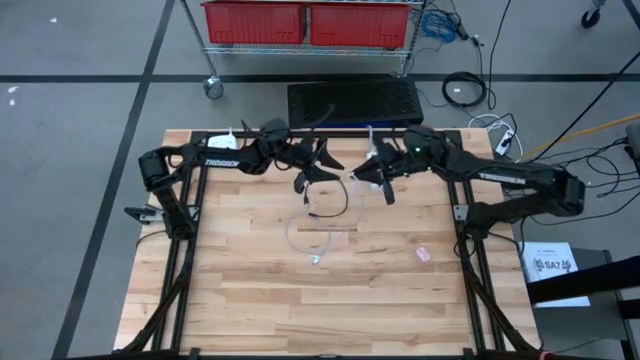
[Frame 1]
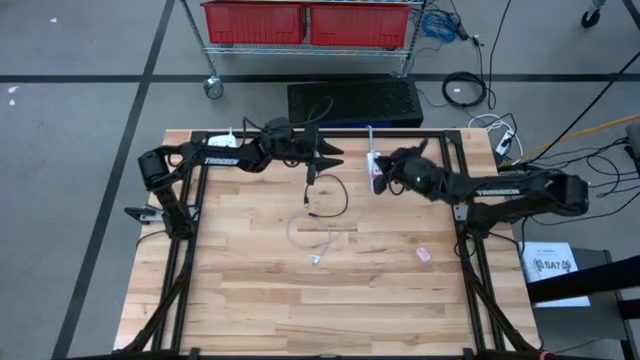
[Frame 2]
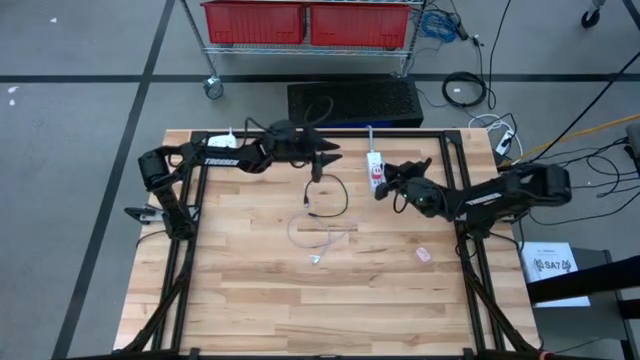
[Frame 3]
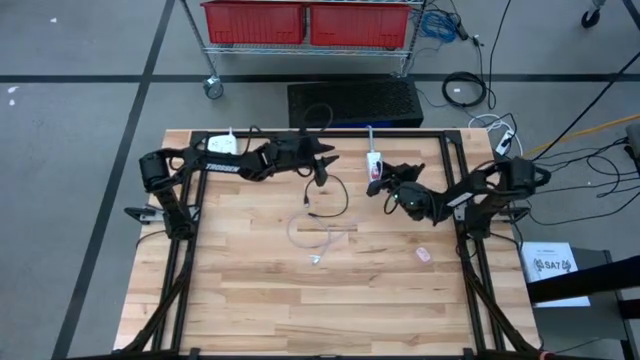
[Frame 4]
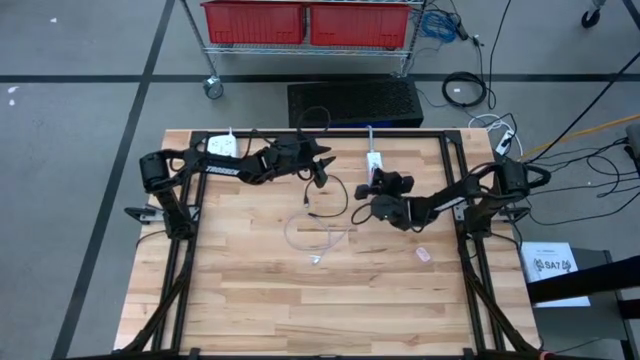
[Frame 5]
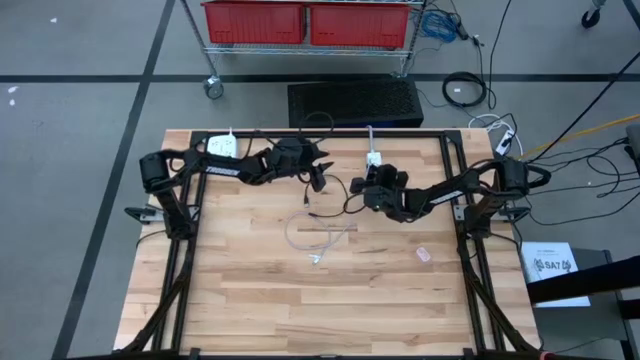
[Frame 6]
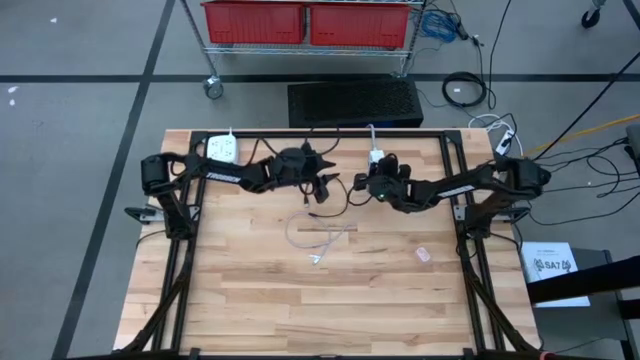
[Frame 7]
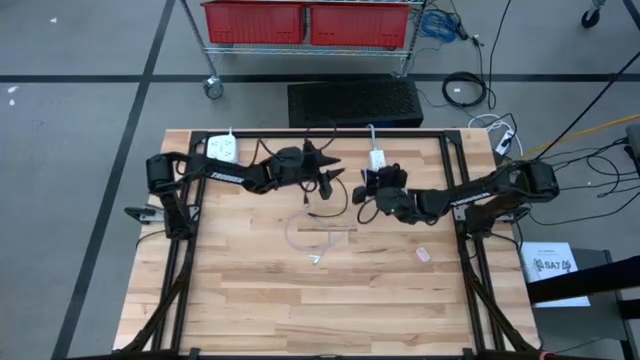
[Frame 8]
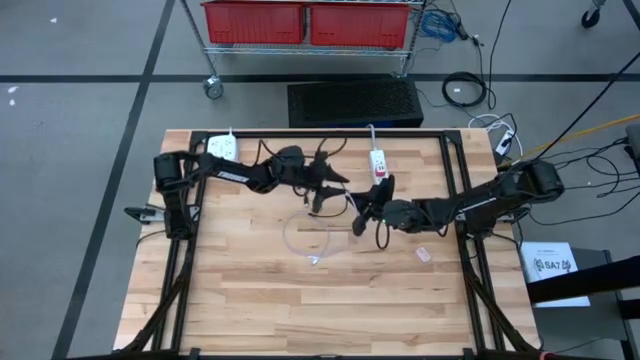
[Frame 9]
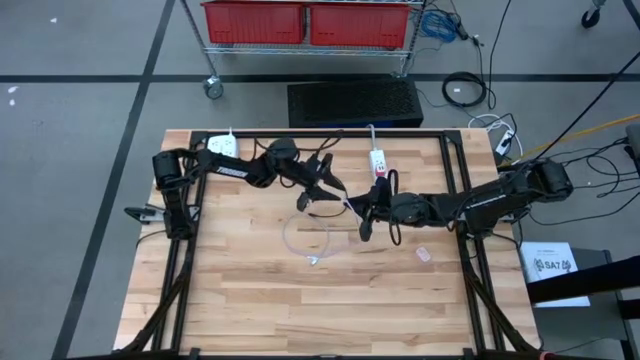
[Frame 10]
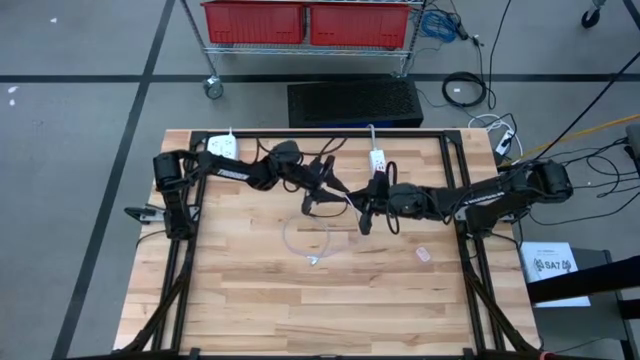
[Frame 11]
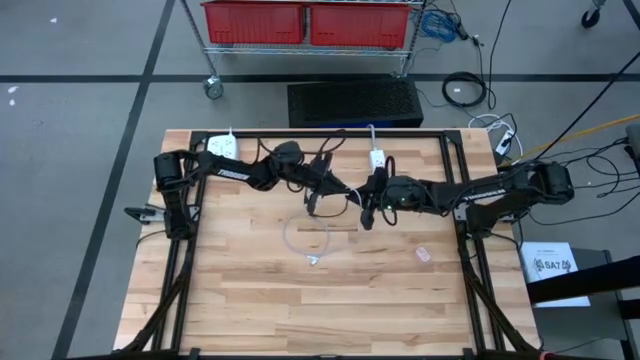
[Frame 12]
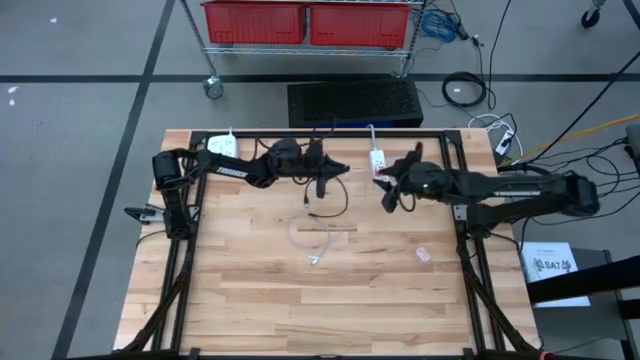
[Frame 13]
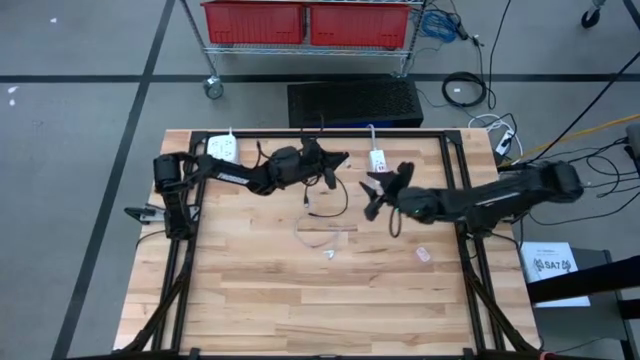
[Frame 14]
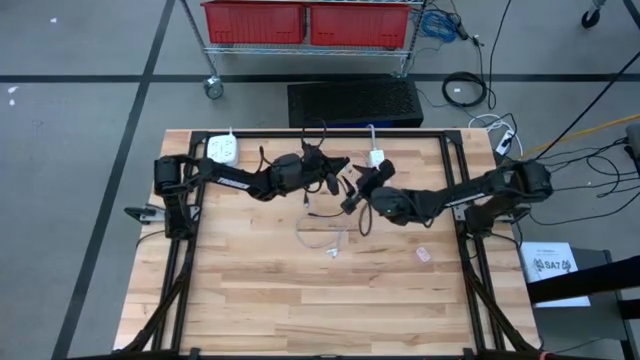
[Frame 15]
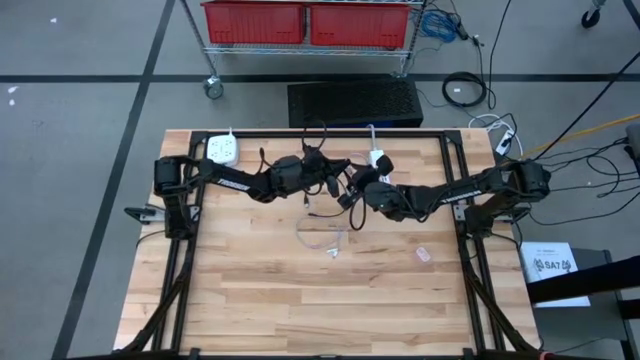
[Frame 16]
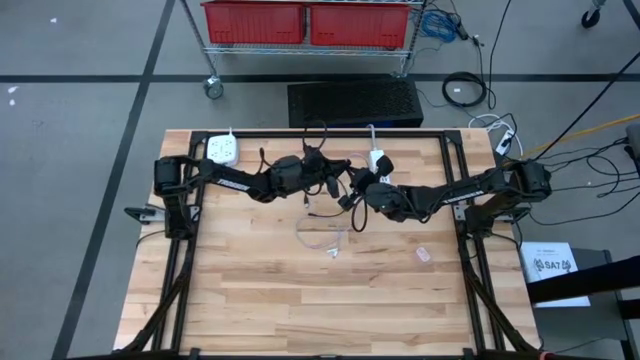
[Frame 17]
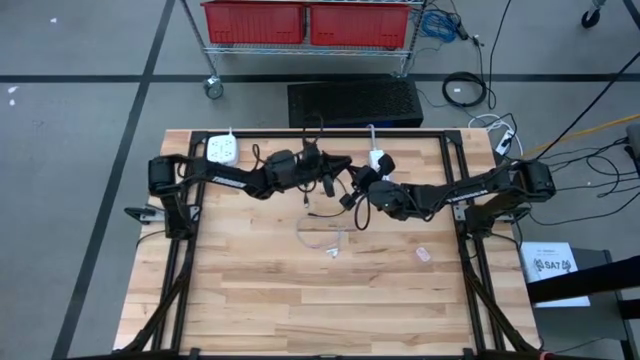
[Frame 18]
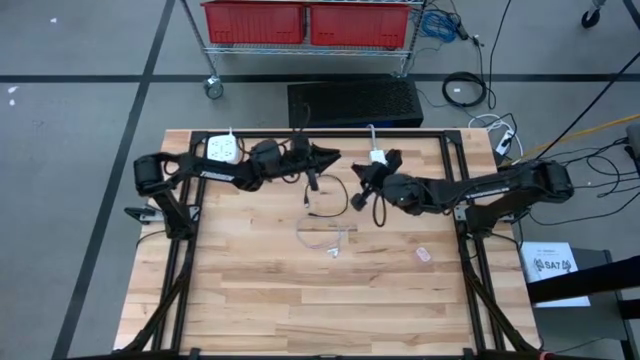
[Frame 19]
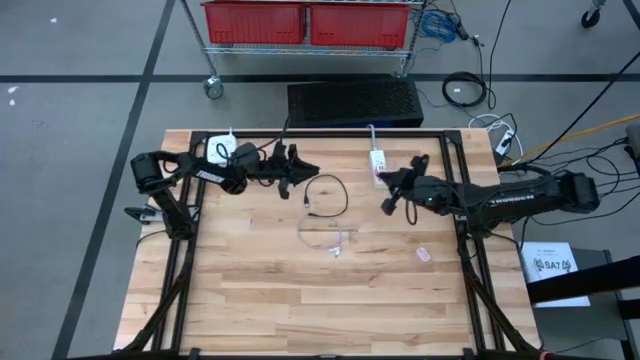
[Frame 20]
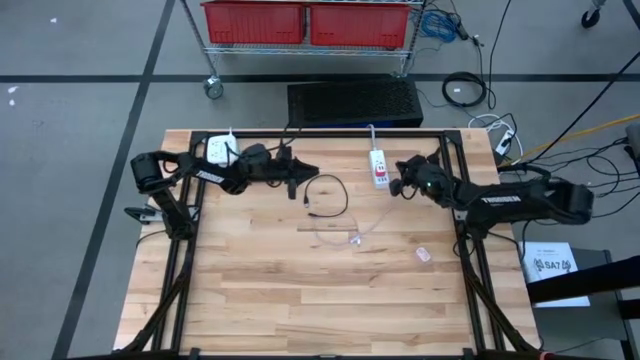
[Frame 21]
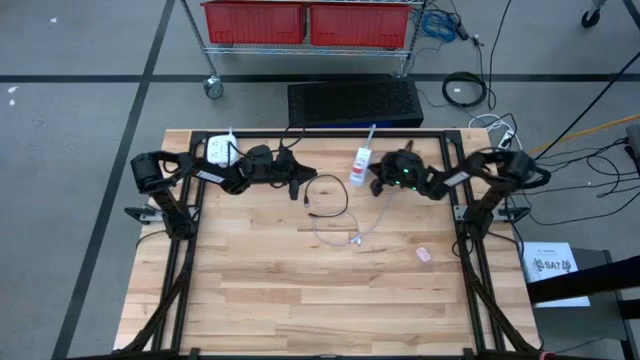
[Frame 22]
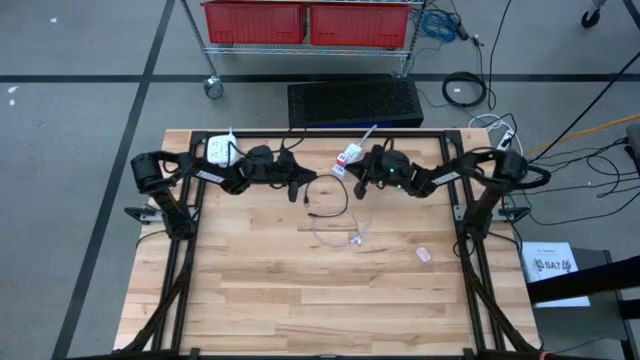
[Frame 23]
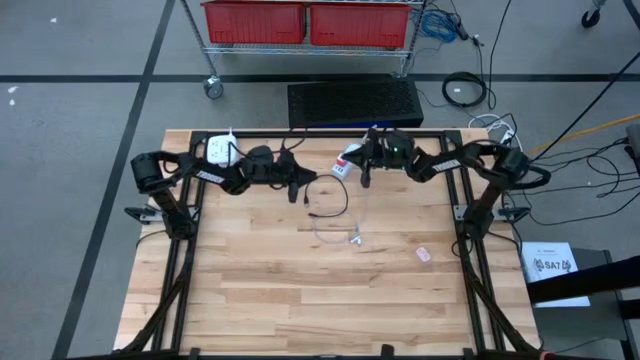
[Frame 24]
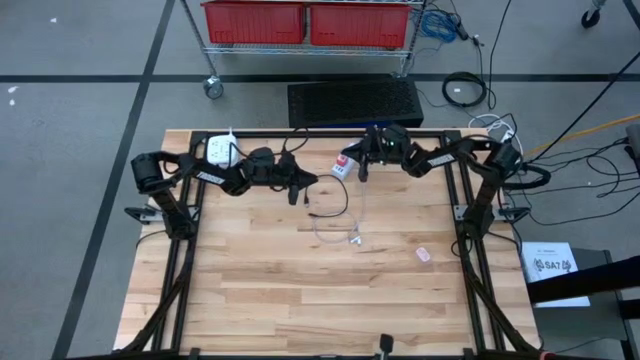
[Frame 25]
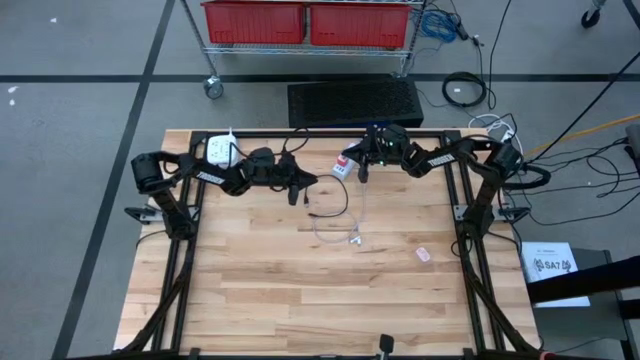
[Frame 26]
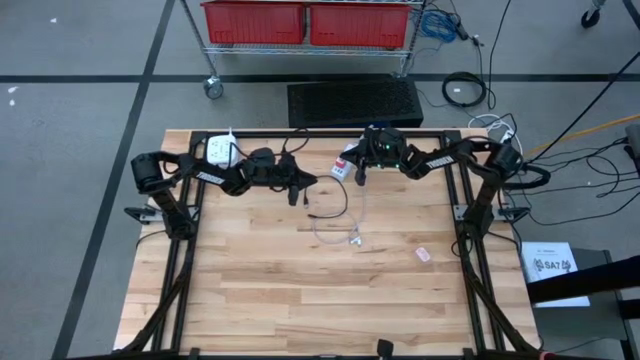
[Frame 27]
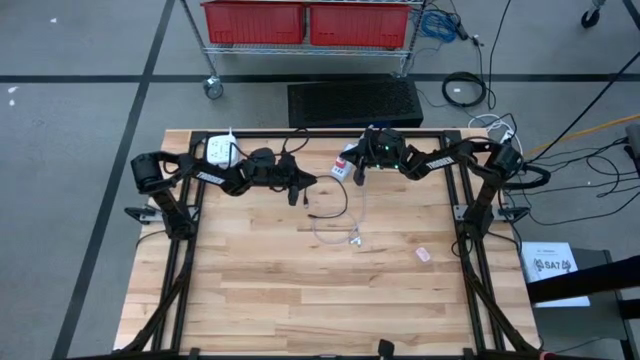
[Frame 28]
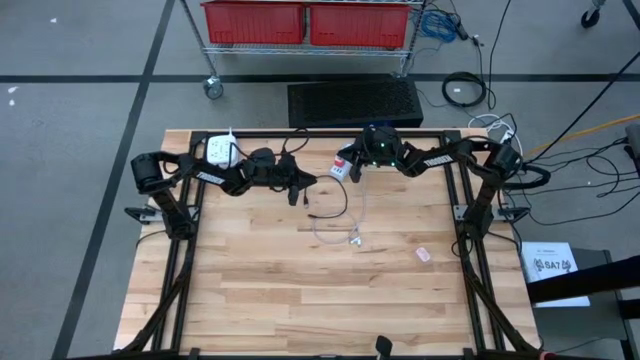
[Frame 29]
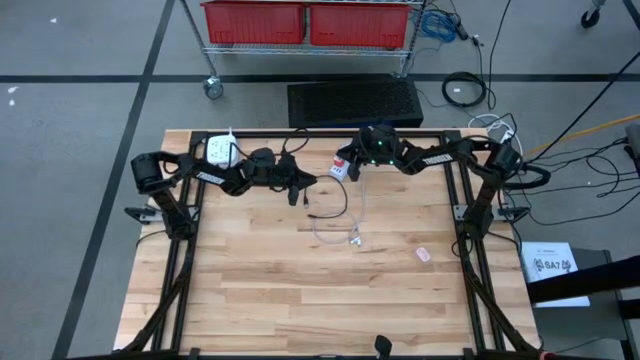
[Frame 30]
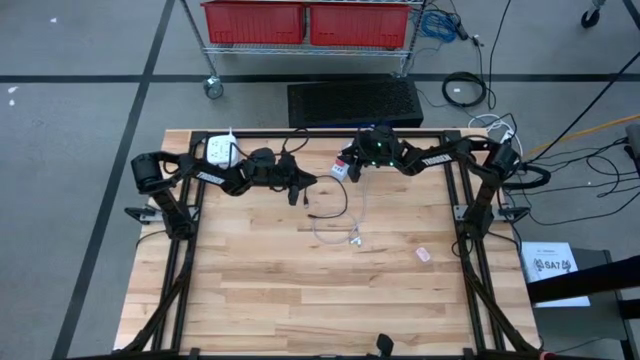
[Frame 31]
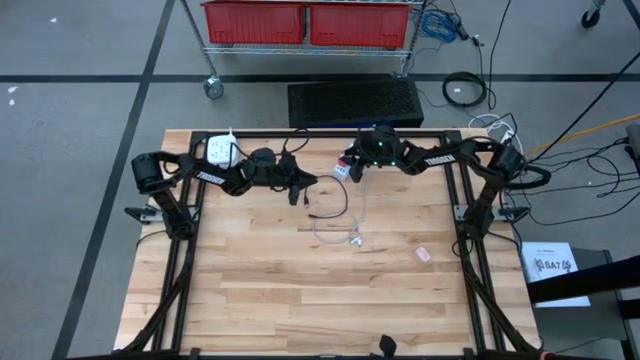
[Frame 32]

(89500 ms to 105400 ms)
Task: Insert USB
Insert the purple charger cable into the red charger adapter

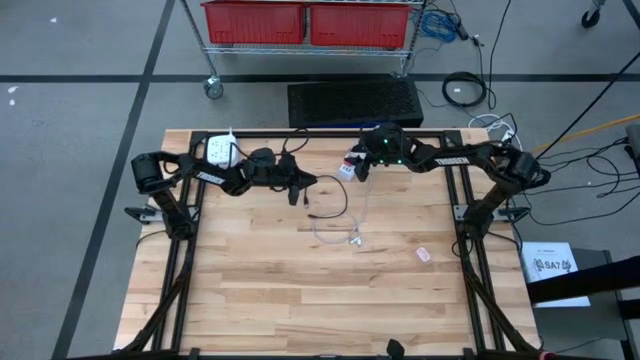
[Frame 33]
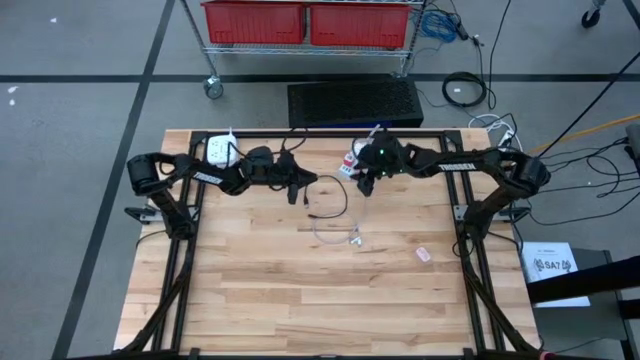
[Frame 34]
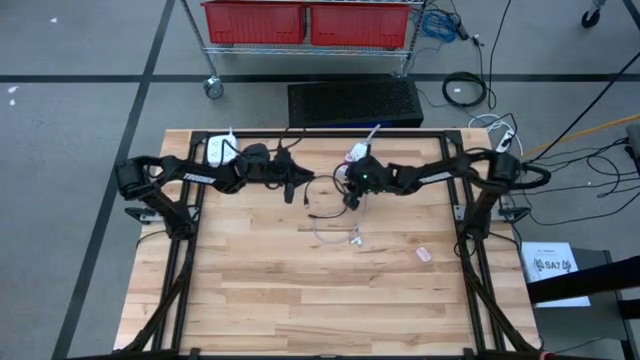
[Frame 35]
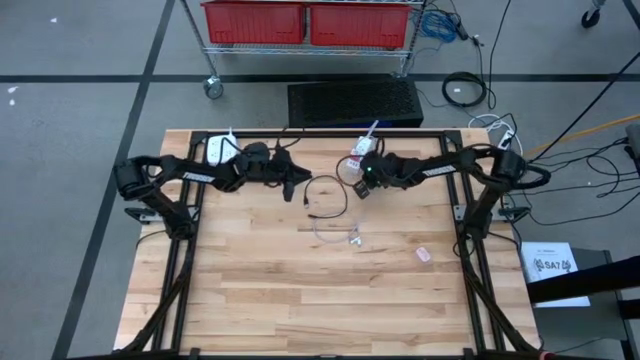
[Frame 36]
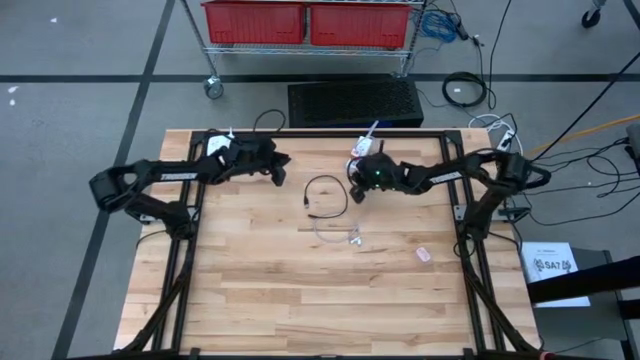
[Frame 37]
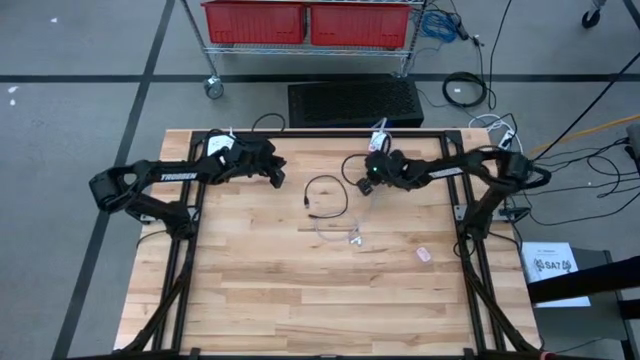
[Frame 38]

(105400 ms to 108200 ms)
Adjust the right white outlet extension towards the top of the table

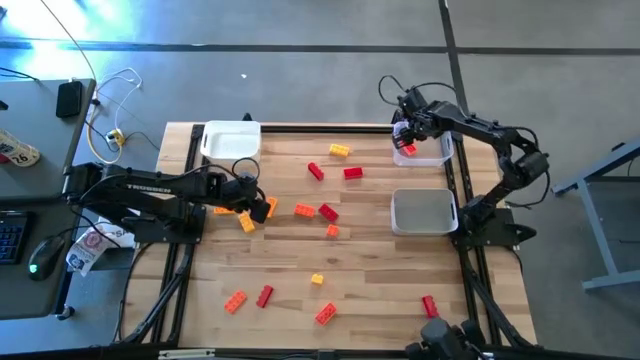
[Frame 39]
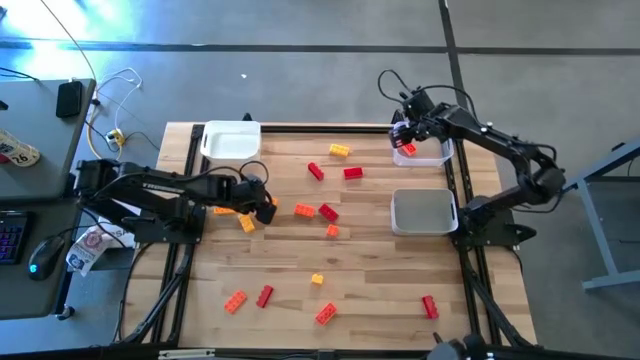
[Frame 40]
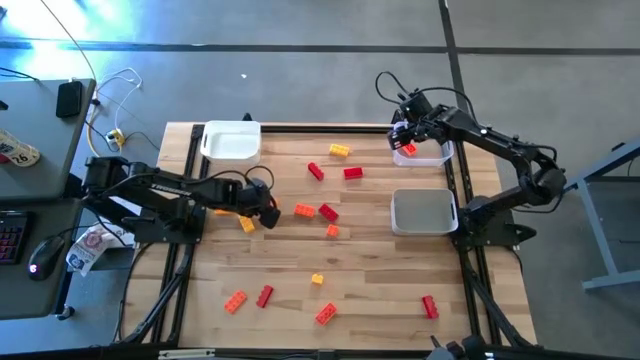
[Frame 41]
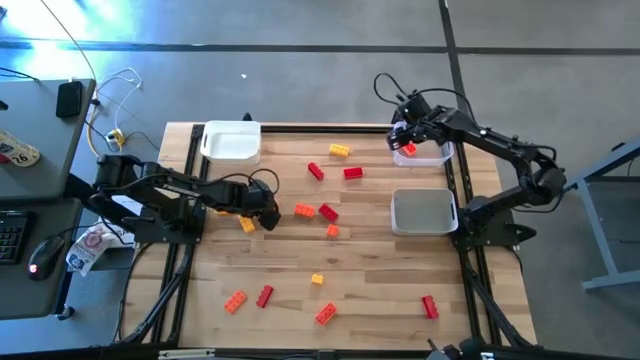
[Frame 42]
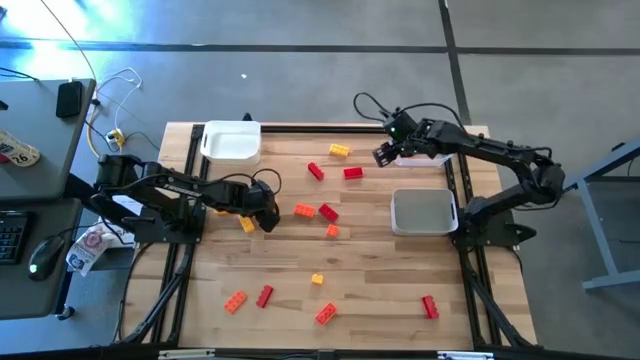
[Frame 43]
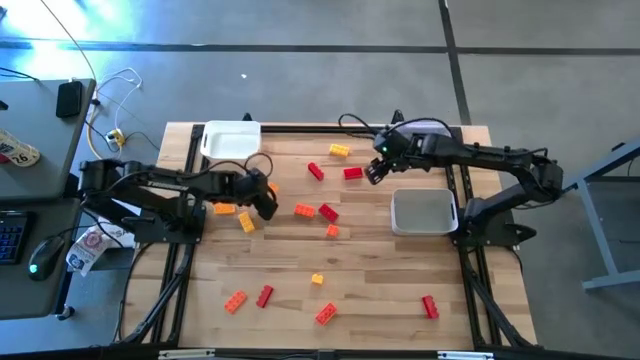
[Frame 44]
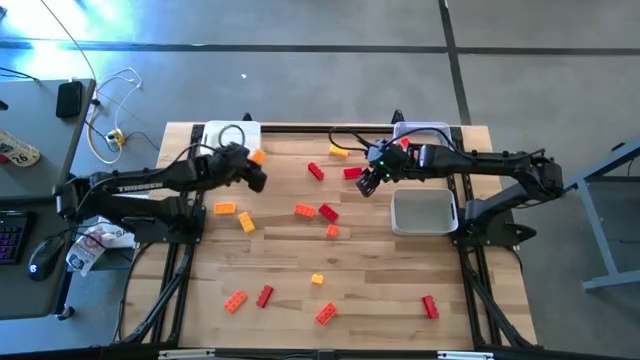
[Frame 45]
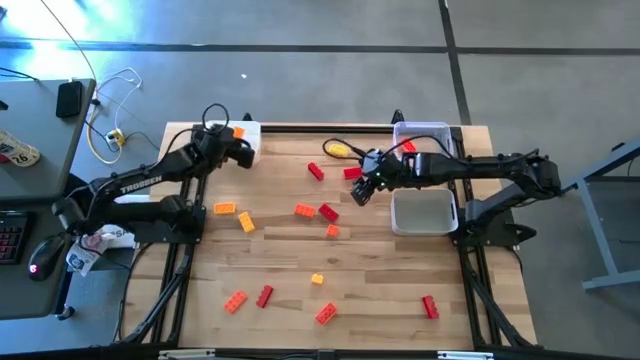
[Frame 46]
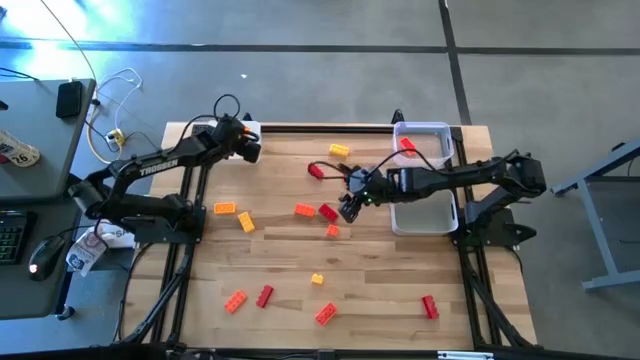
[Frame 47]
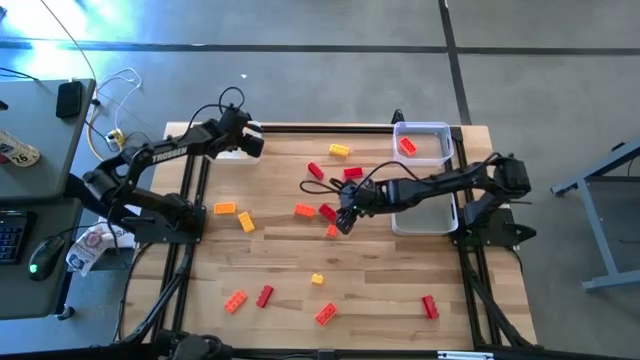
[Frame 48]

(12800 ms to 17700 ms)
Task: Sort & place blocks by color
Put the yellow game piece into the white bin
